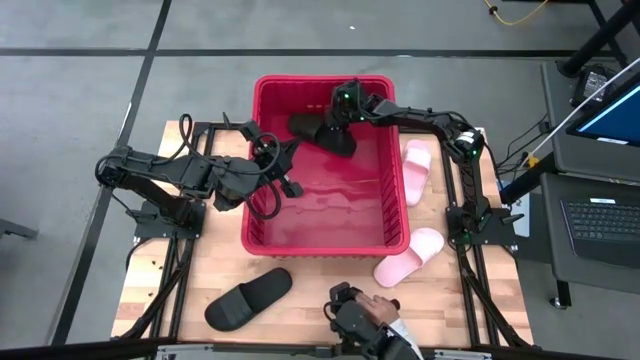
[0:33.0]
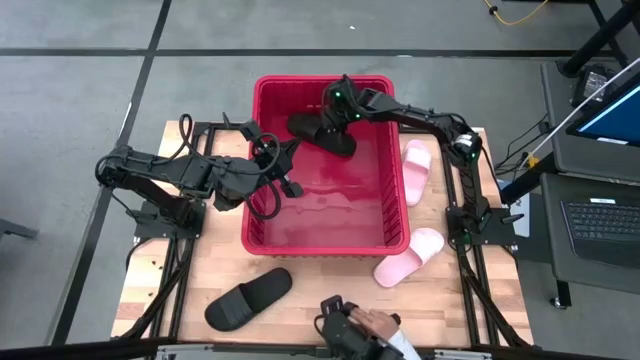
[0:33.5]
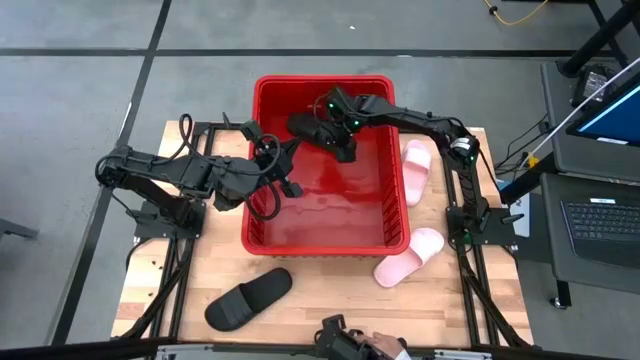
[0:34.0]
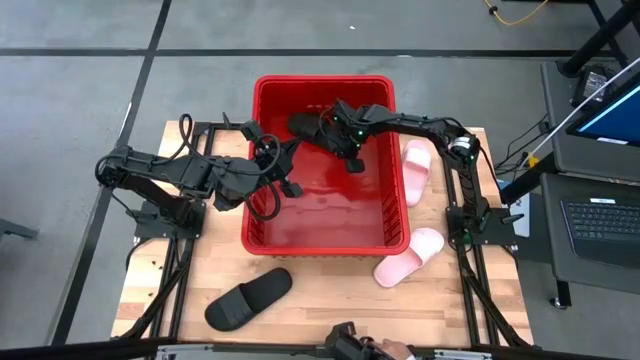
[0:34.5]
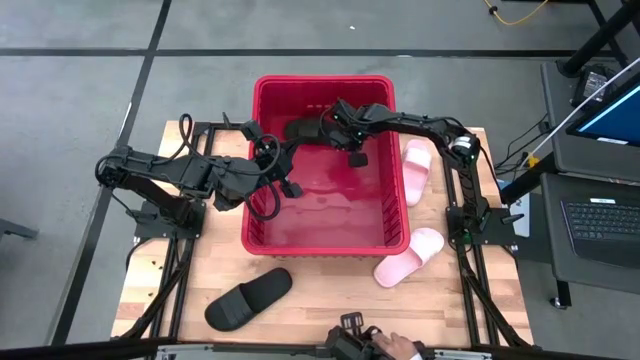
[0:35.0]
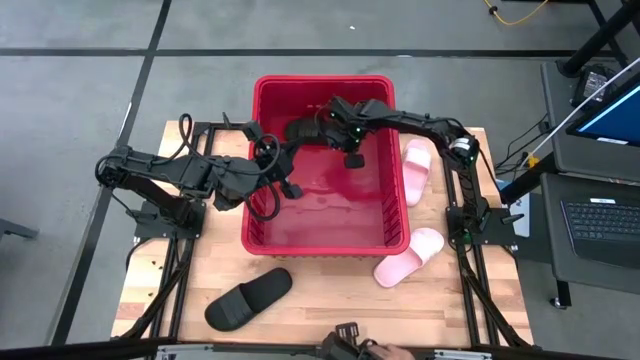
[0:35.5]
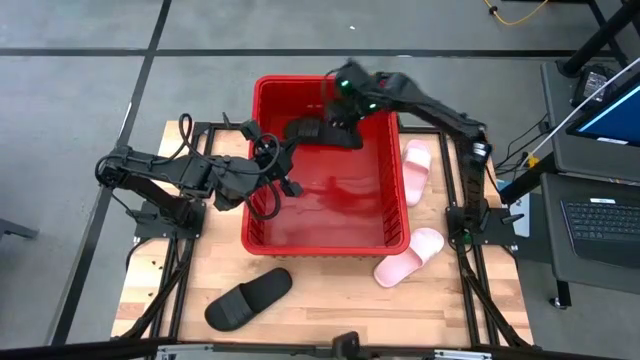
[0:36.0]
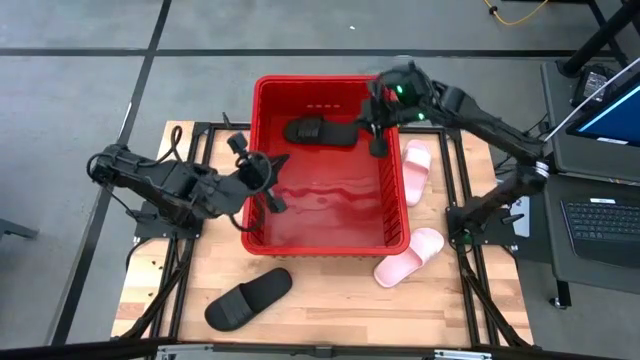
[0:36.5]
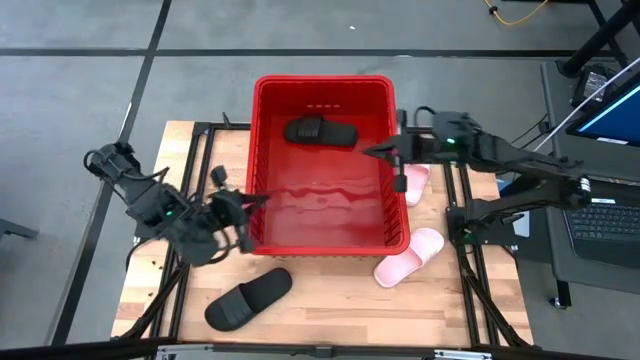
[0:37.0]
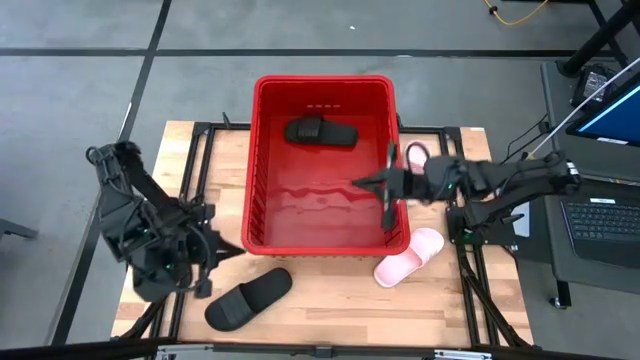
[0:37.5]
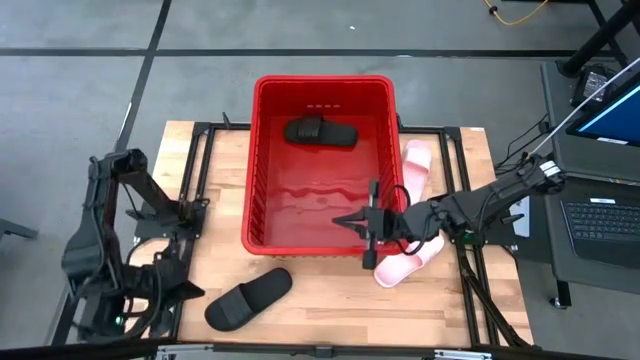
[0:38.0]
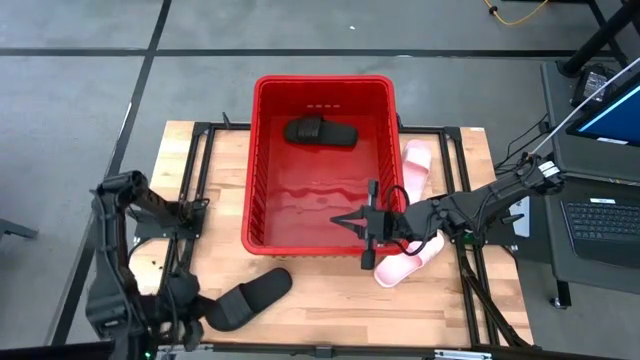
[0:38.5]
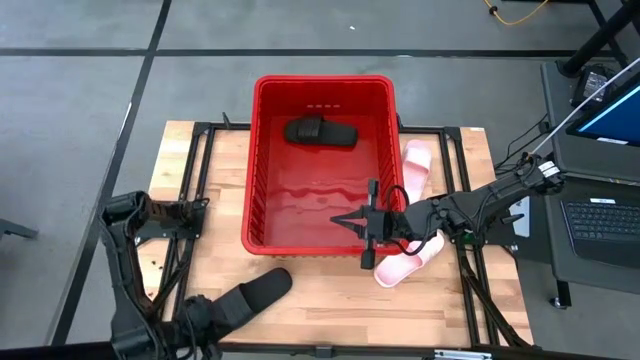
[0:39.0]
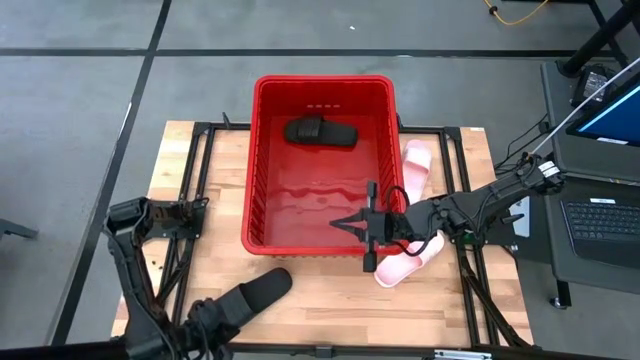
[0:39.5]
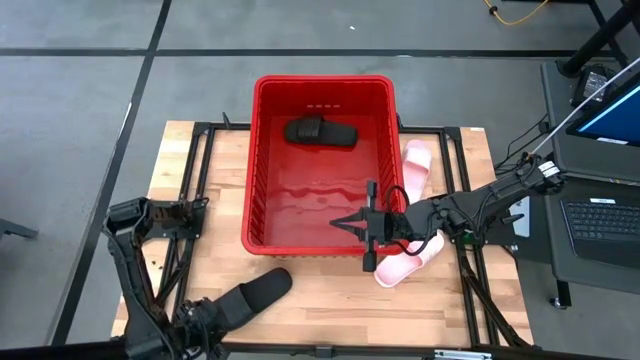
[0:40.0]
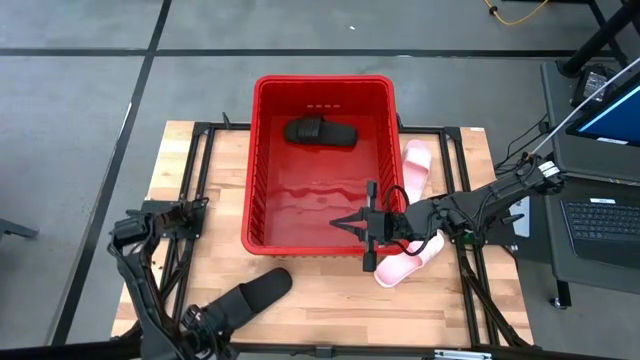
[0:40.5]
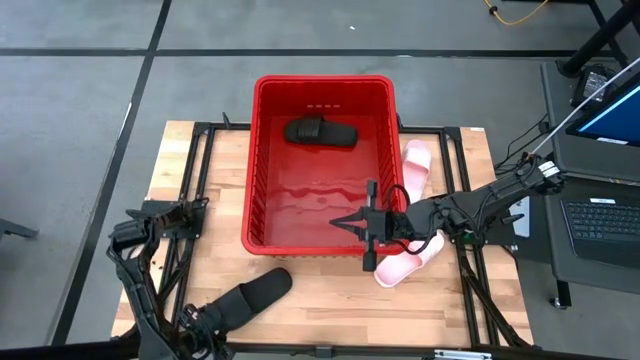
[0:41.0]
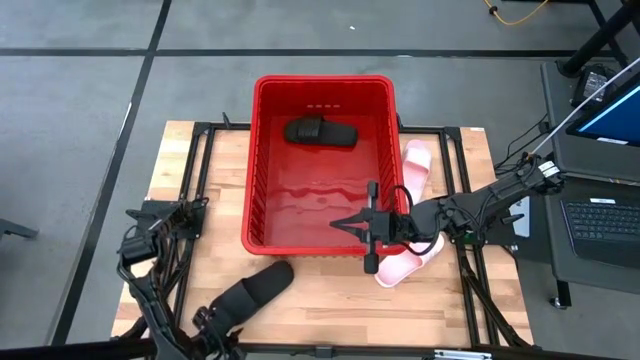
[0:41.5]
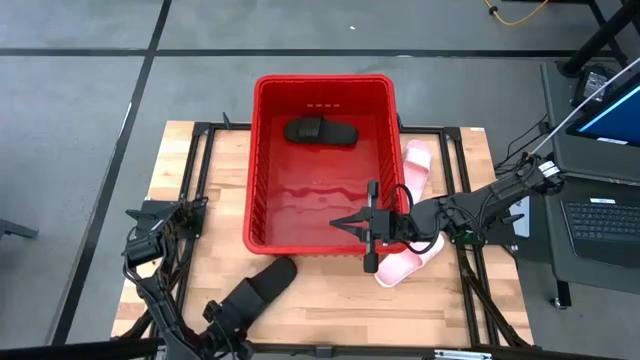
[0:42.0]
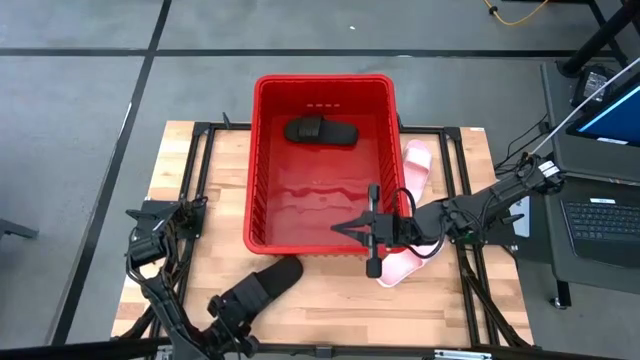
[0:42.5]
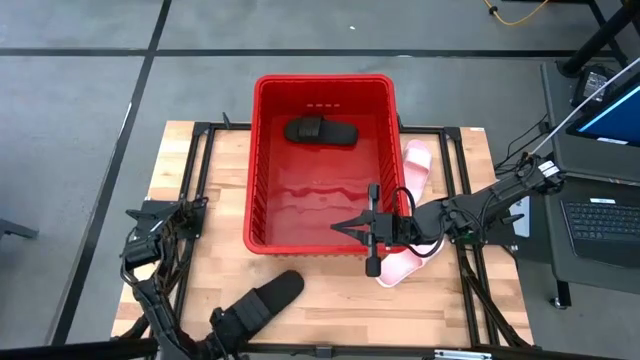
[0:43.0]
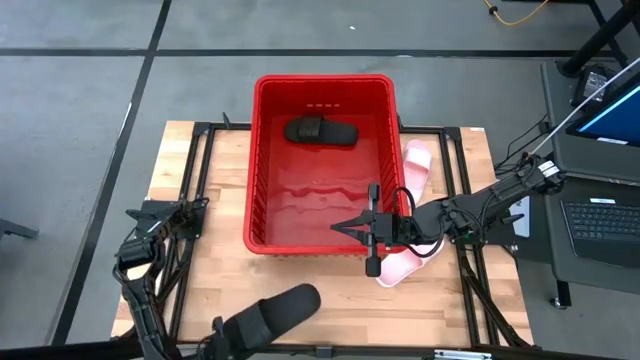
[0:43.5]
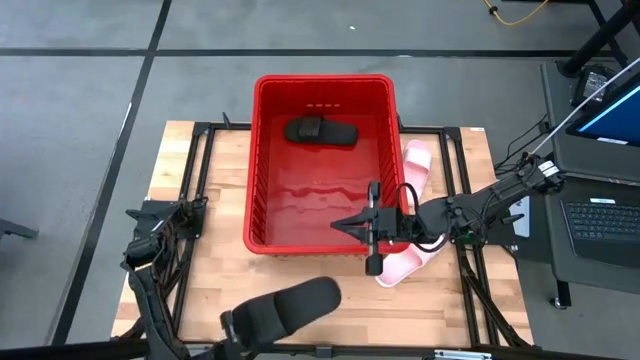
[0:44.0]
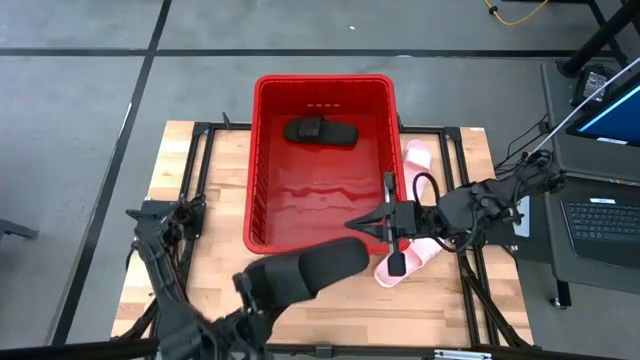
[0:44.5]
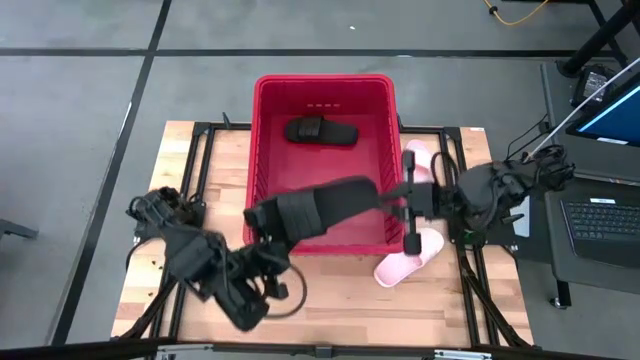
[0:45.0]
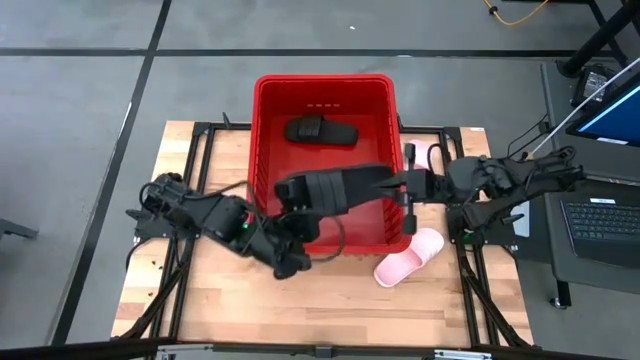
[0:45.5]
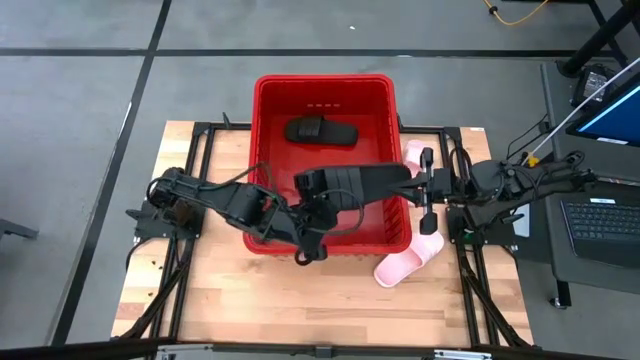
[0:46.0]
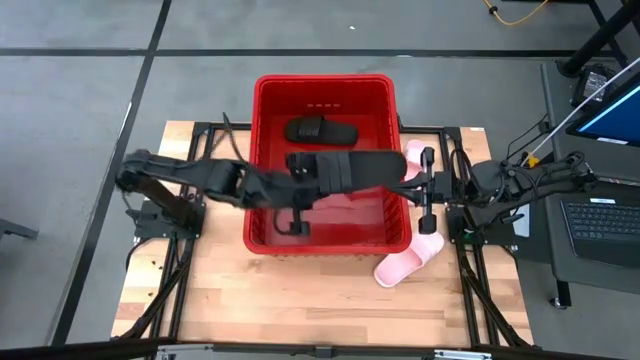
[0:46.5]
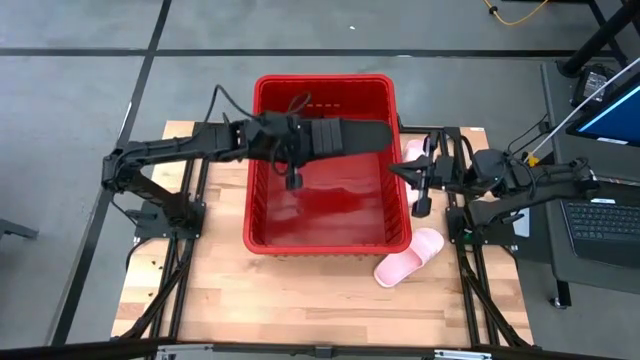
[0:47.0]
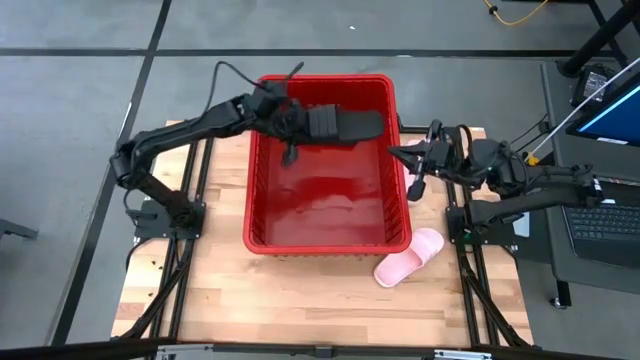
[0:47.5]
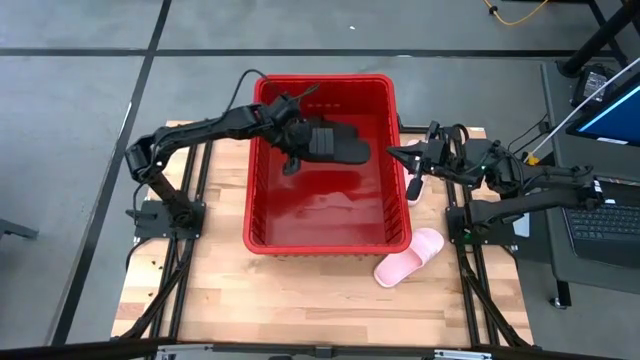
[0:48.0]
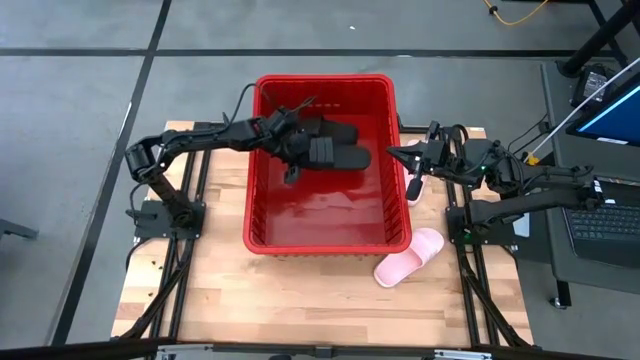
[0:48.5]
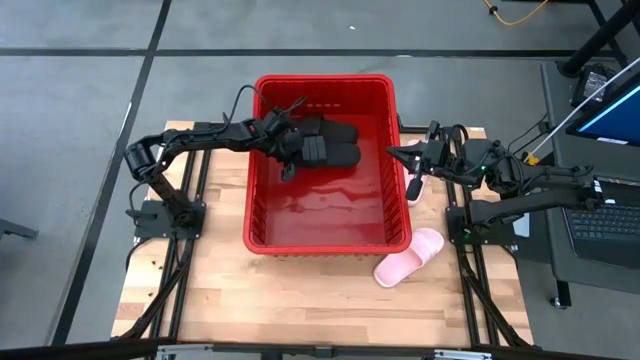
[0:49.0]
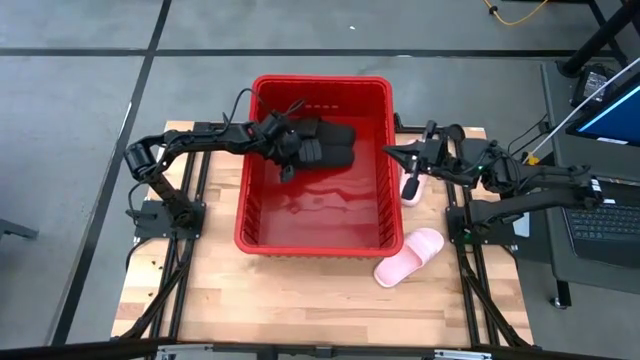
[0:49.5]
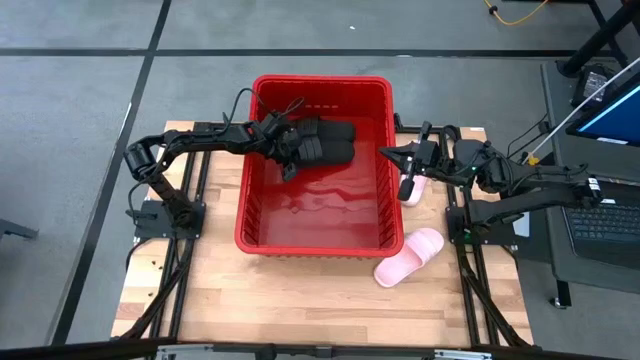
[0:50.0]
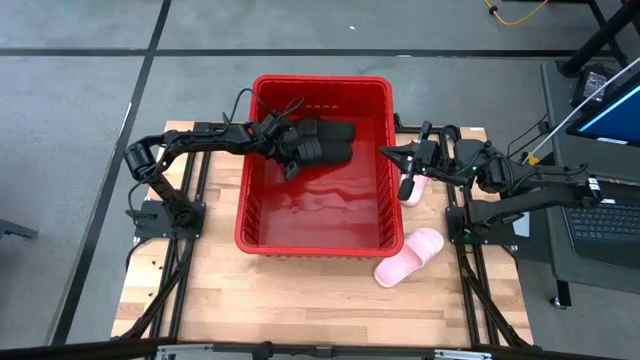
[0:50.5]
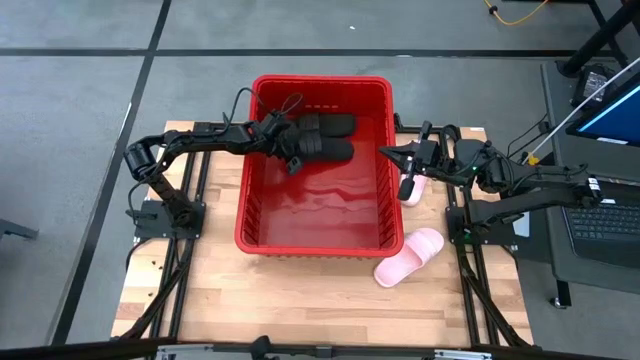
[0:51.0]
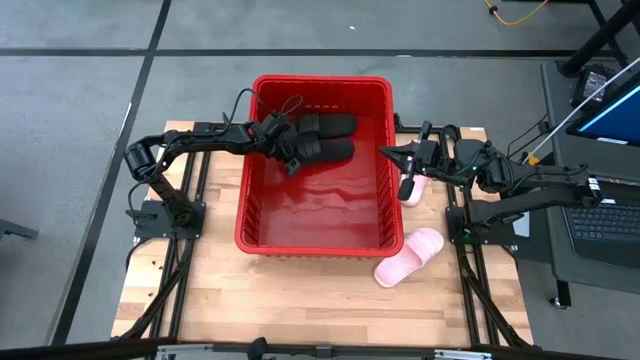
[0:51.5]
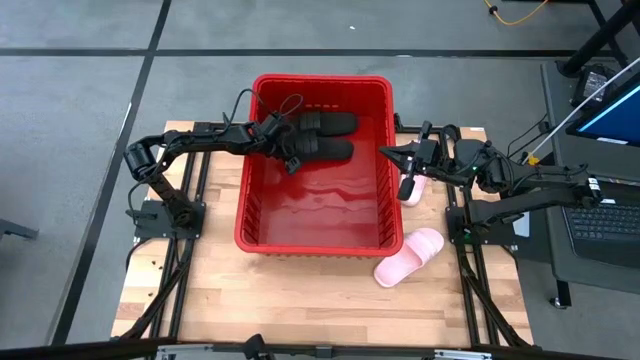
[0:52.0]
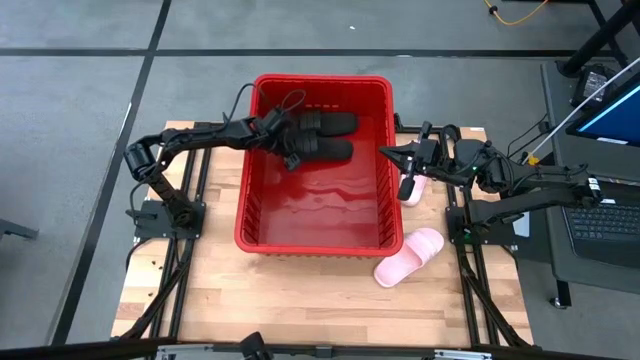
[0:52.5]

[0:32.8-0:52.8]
Task: Pick and place slides into bin
Put the bottom left black slide into the red bin

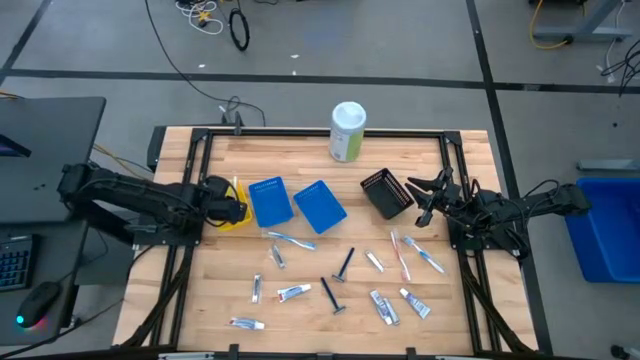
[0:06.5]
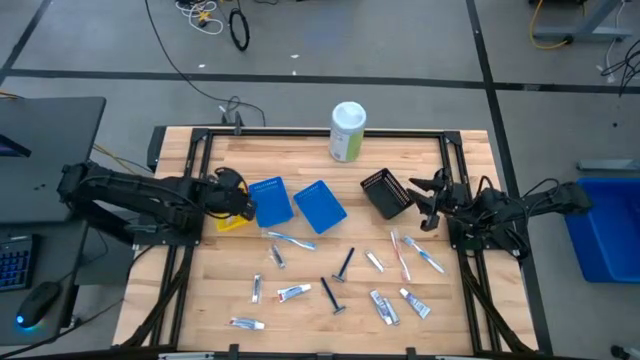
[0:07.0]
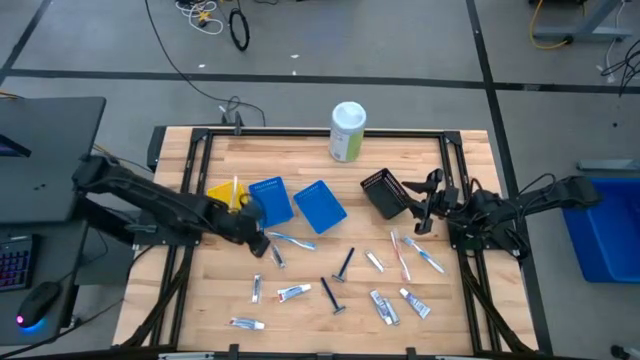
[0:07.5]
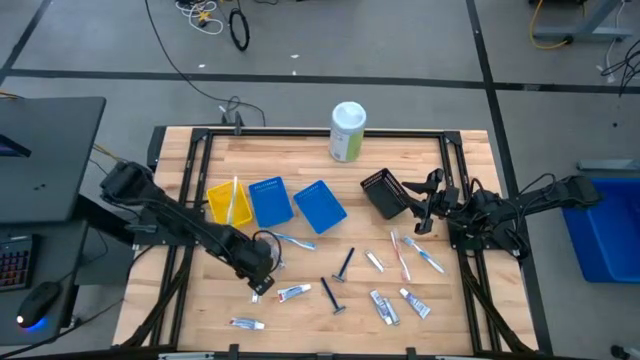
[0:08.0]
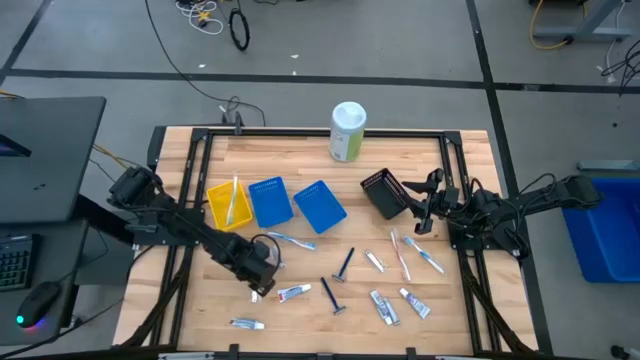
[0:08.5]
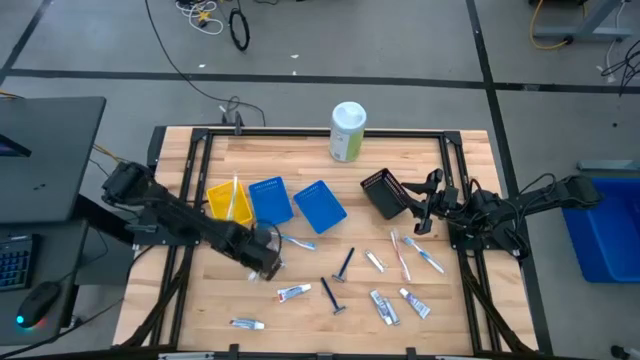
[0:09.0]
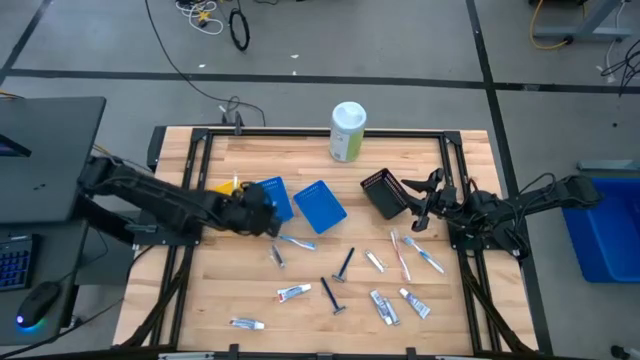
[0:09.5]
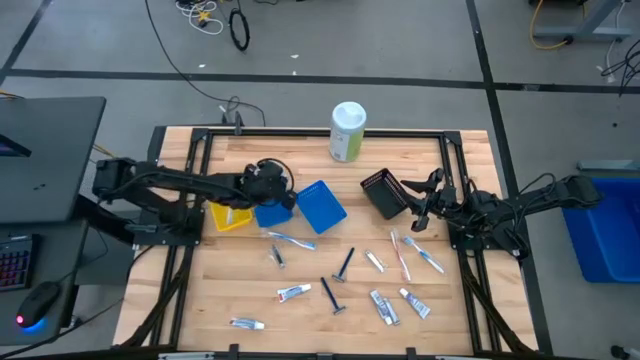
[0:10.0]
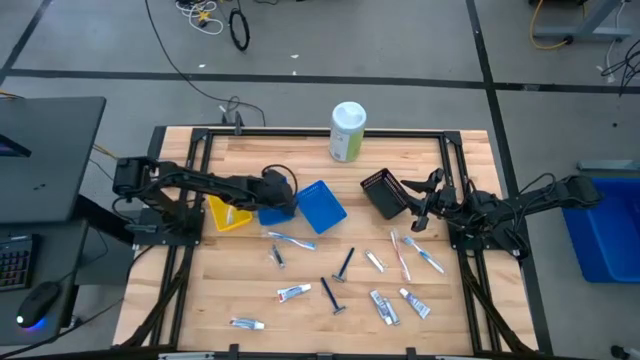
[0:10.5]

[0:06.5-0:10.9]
Task: Pick & Place Travel size toiletries
Put the bottom left silver nail cutter into the left blue bin
